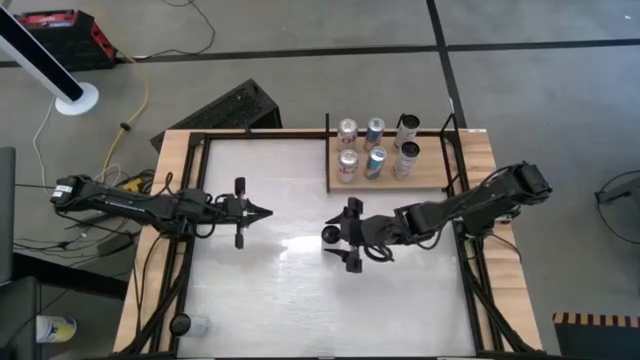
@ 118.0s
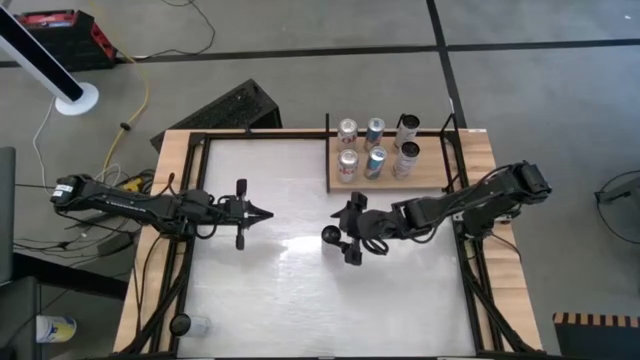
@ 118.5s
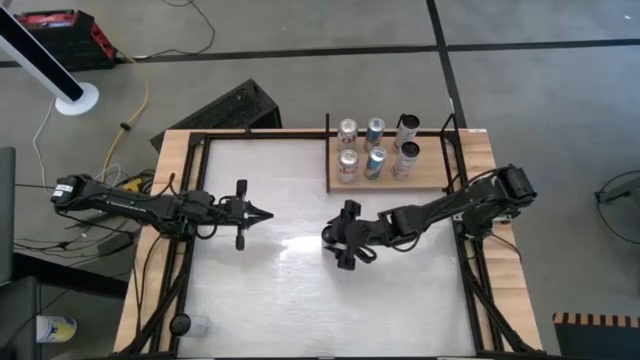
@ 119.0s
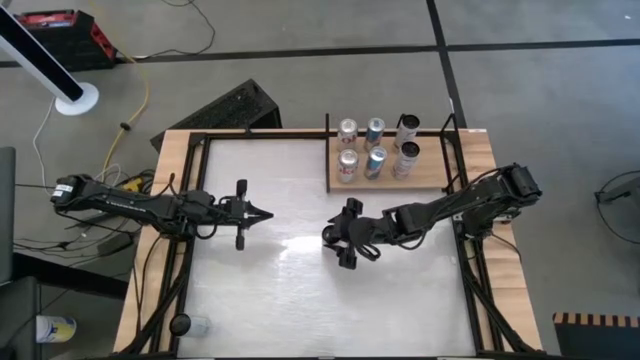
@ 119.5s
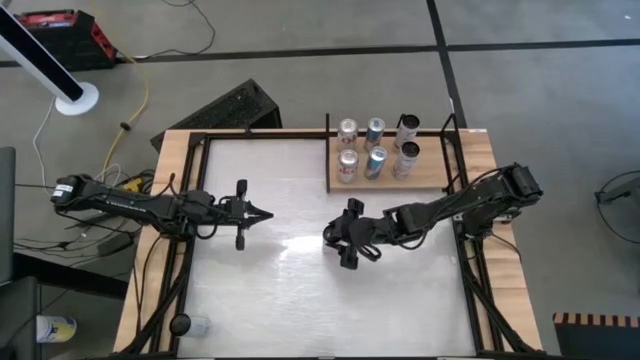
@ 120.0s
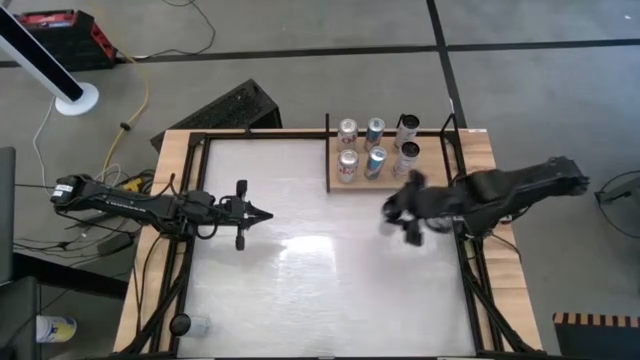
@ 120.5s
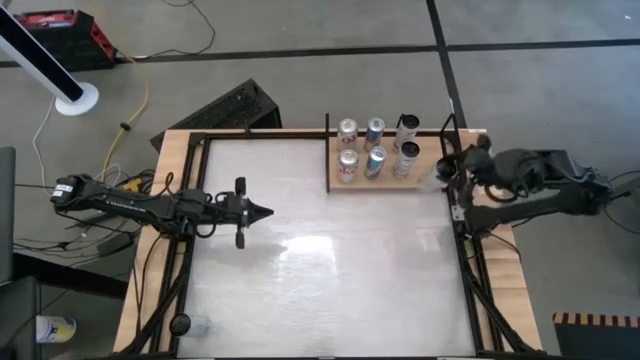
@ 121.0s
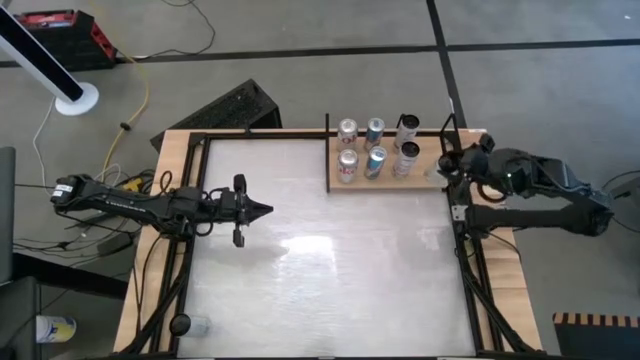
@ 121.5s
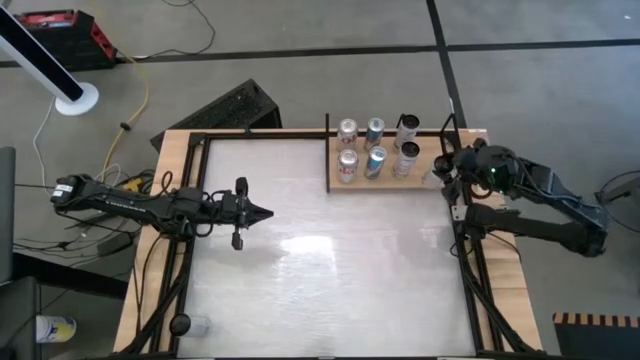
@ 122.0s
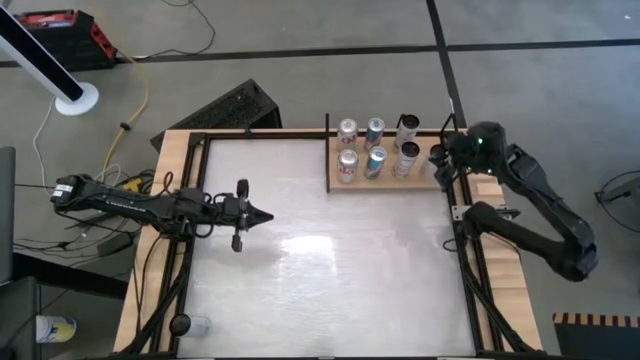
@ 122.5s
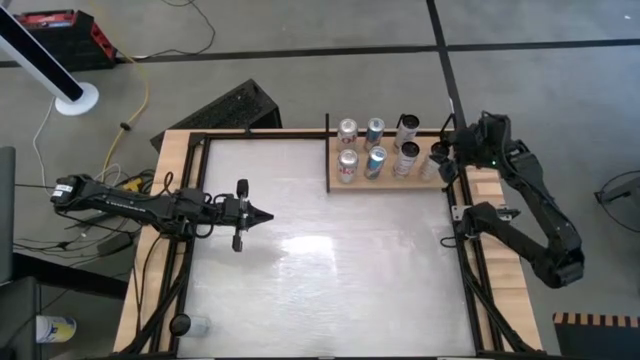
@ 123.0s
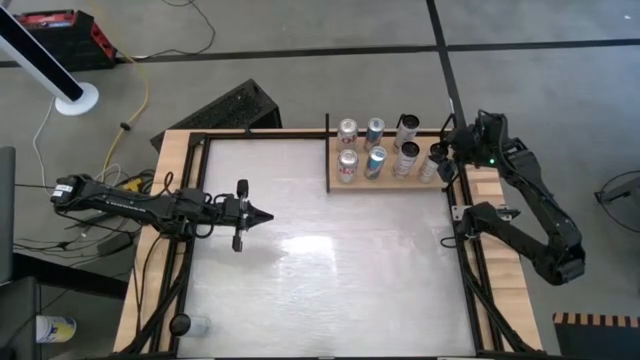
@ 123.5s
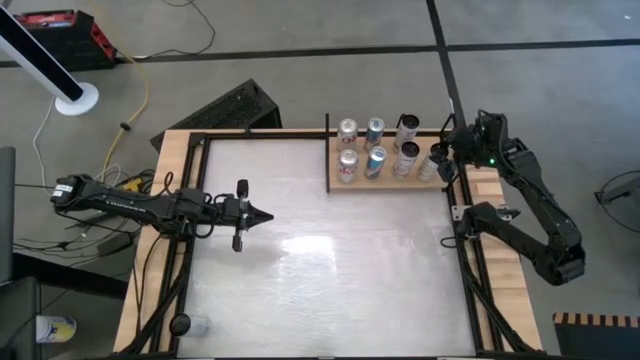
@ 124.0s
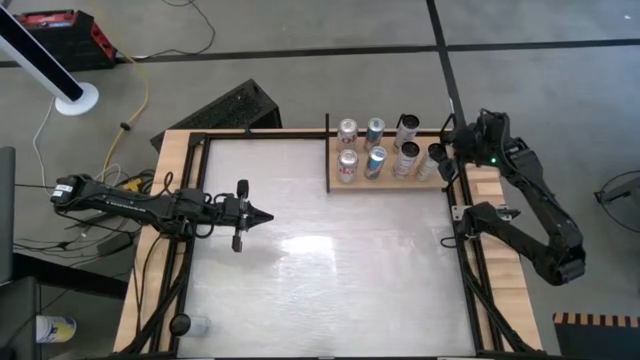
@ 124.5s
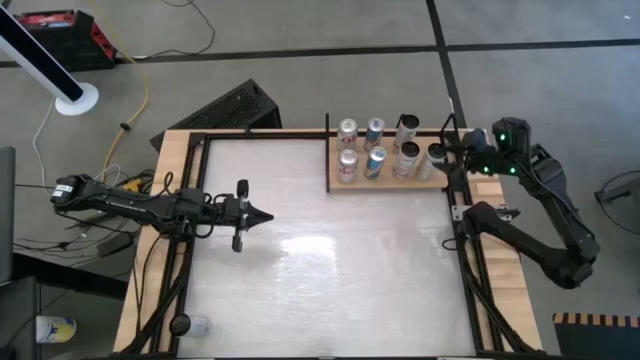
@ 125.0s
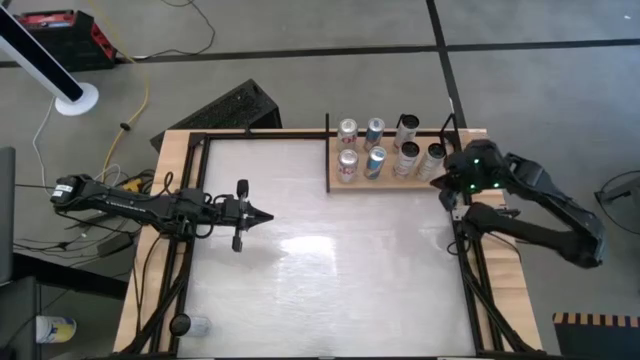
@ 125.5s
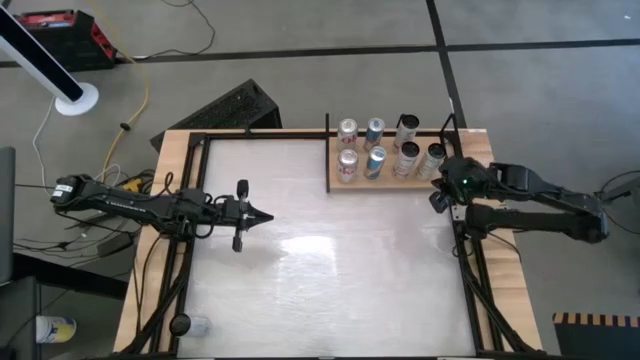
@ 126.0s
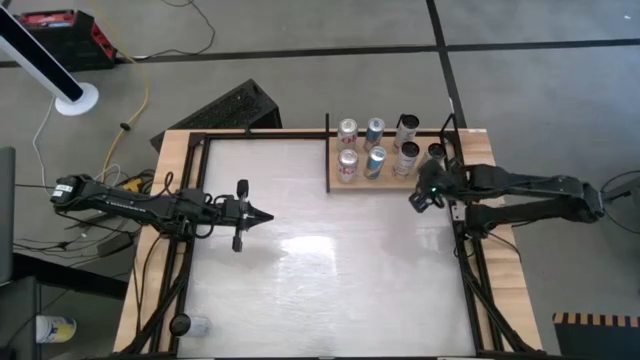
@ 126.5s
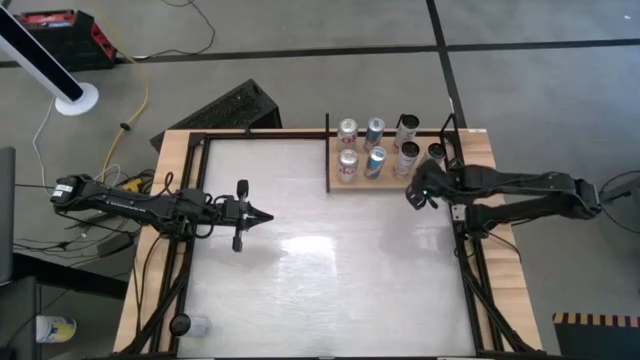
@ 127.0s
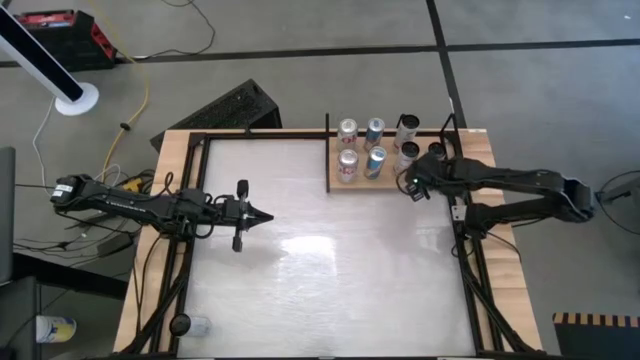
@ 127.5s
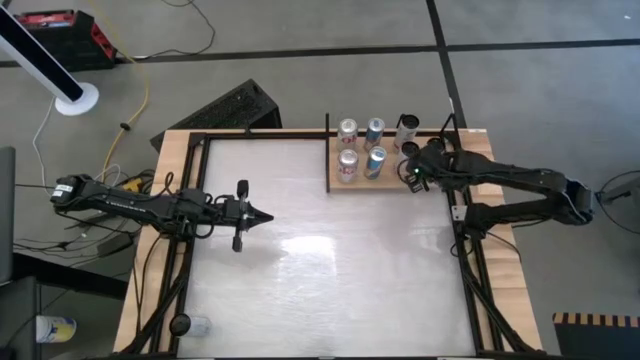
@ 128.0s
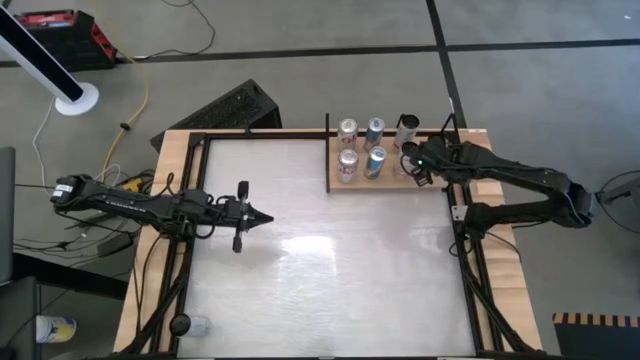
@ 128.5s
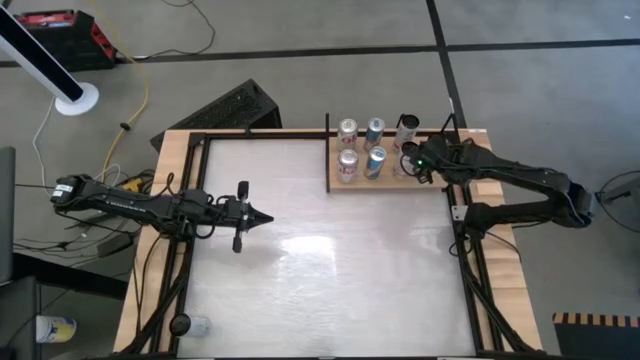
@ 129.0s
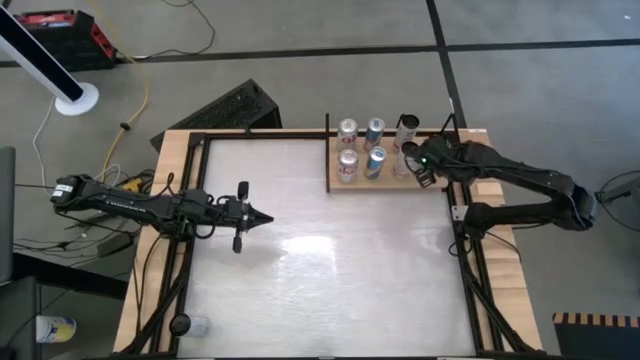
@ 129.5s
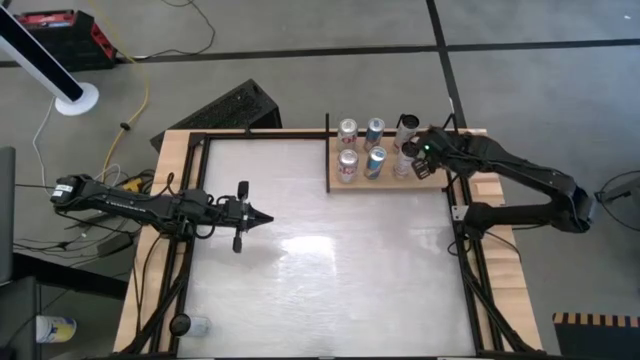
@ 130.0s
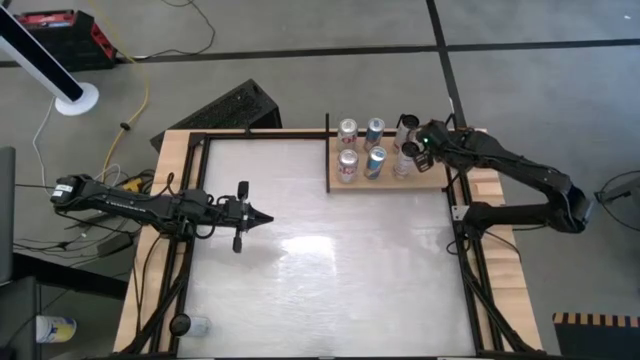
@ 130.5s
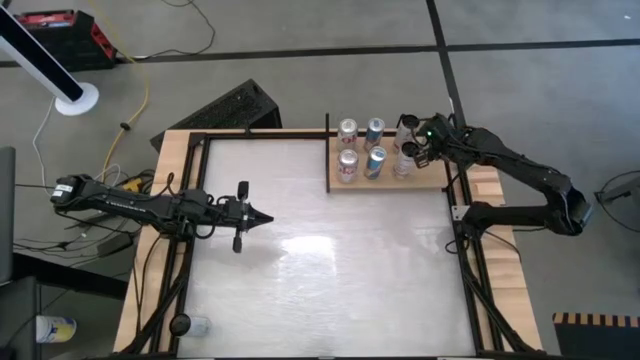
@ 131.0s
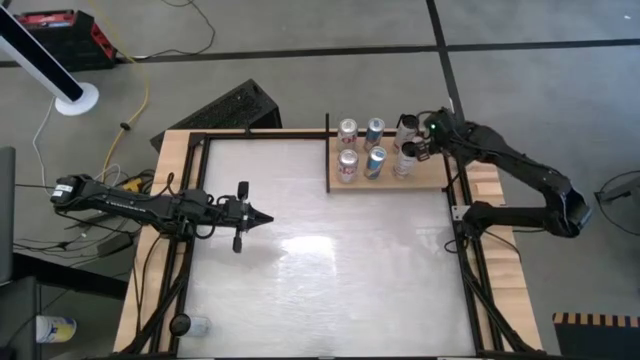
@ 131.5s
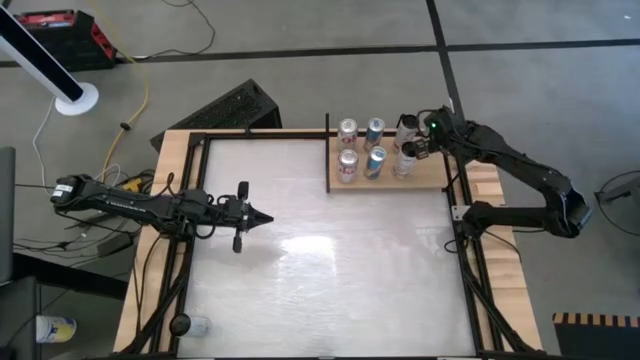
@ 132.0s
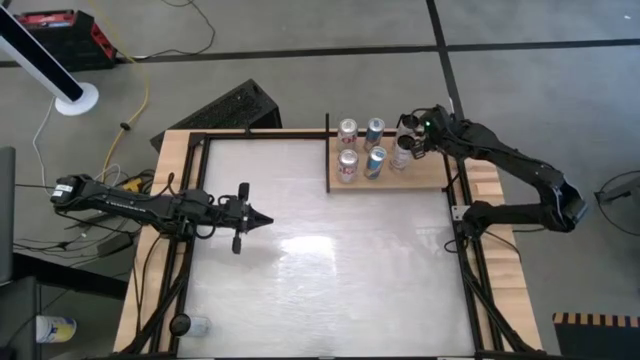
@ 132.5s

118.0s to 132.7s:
Task: Place canned beverage on shelf
Put the top white-yellow soda can on the shelf

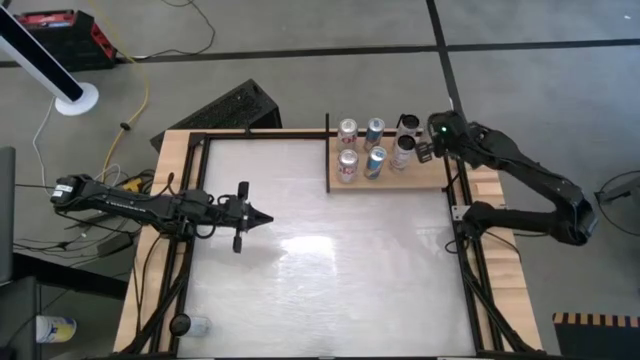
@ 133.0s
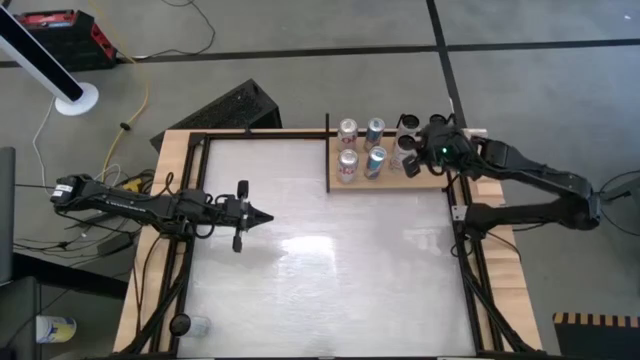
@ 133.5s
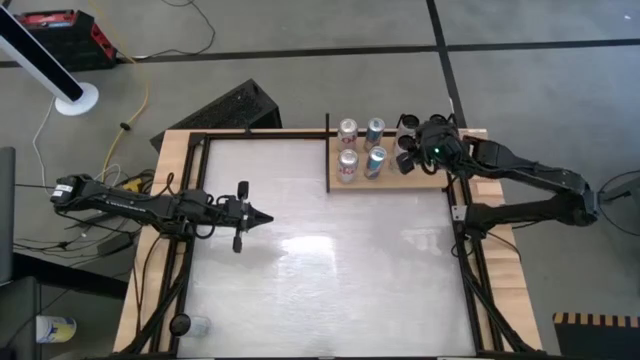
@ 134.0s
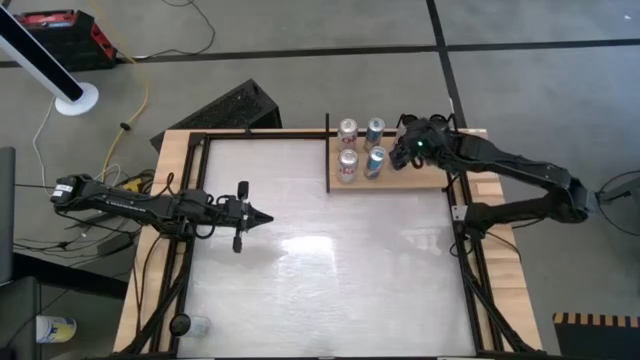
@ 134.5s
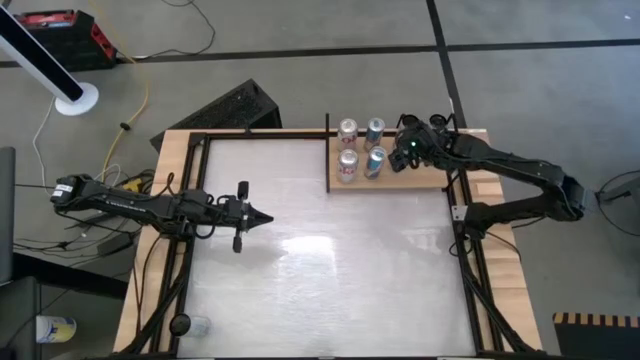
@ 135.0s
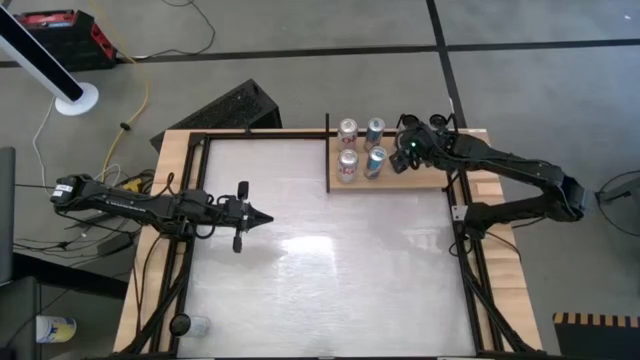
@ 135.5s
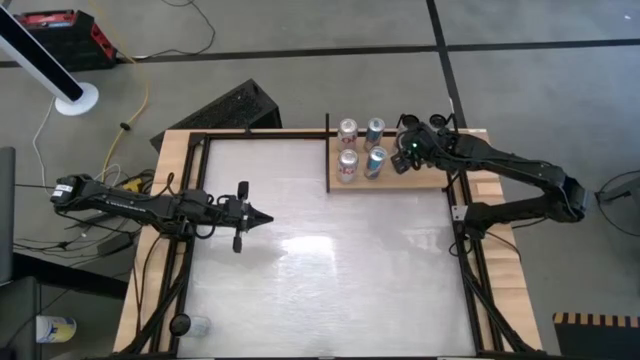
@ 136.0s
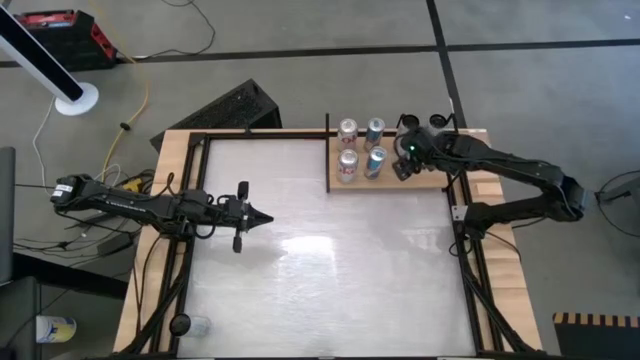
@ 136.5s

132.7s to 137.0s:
Adjust the bottom white-pink soda can on the shelf

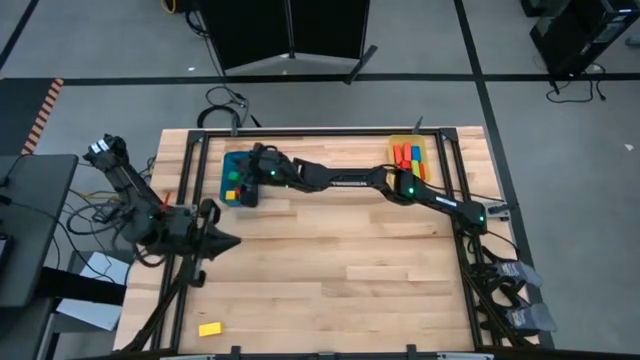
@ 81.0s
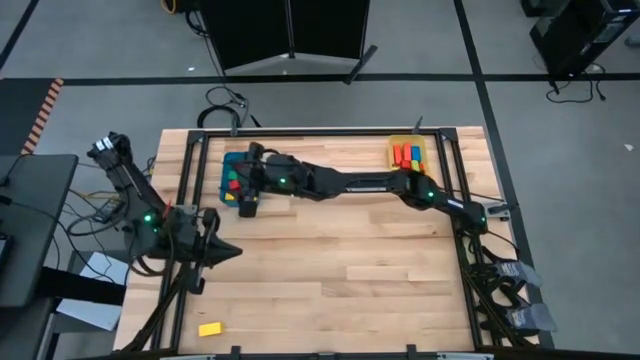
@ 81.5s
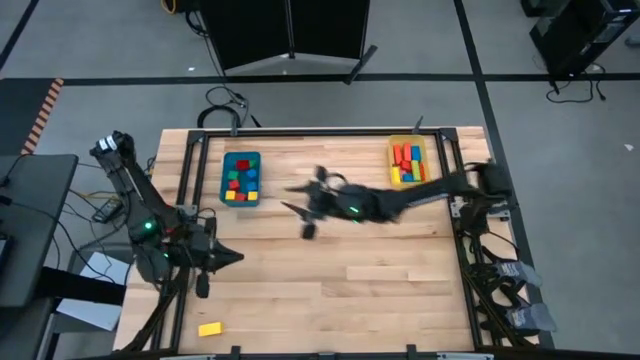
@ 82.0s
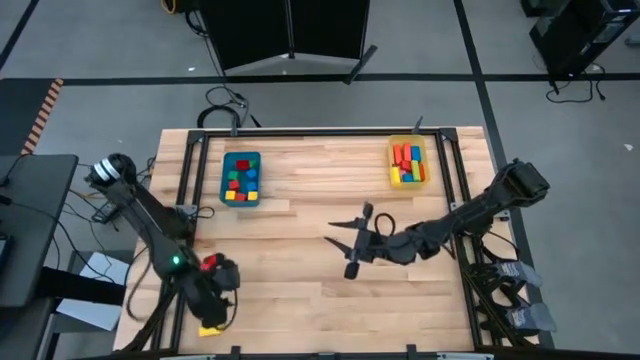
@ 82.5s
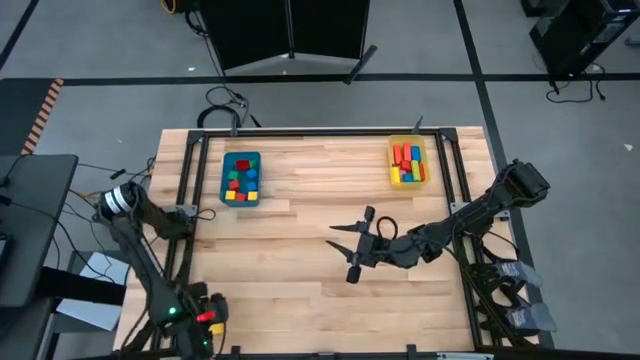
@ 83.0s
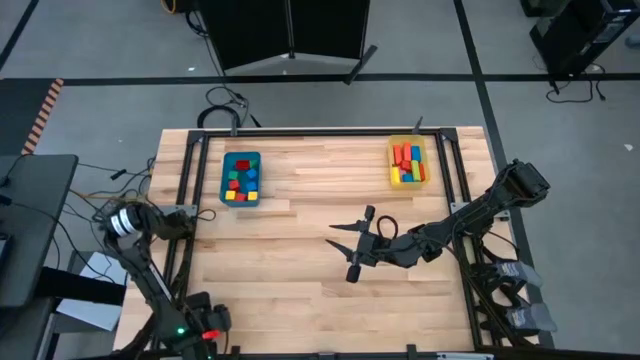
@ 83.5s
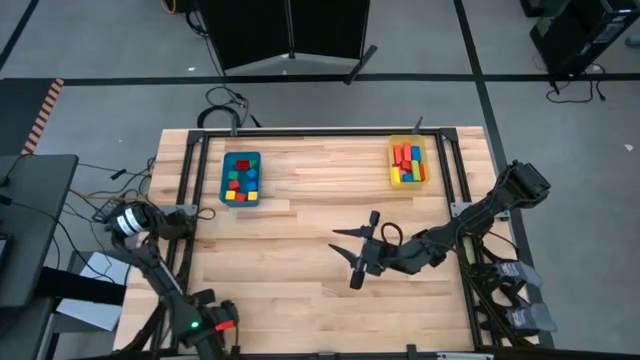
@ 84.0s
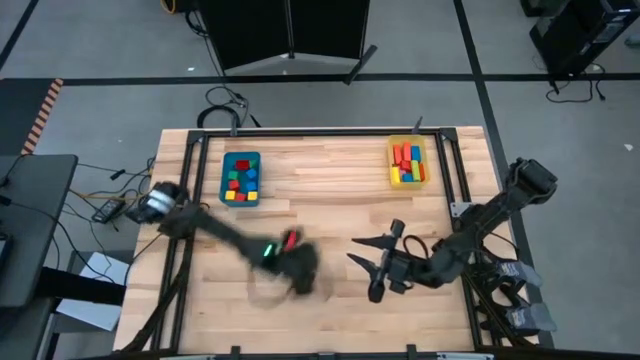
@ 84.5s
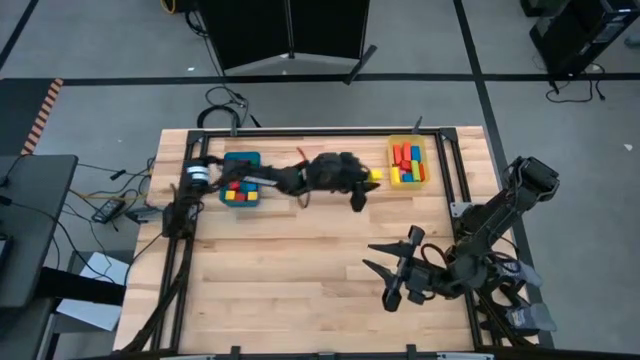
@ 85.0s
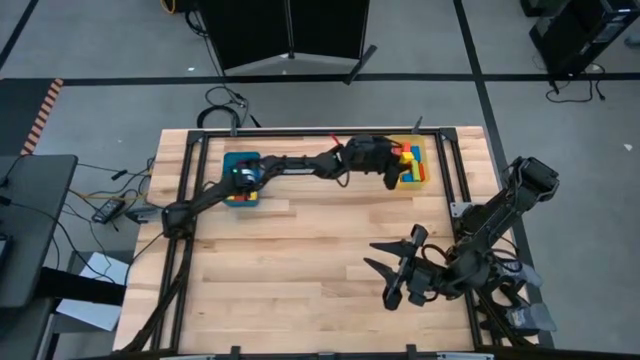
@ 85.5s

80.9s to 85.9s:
Task: Sort blocks by size
Put the large yellow block into the yellow bin
